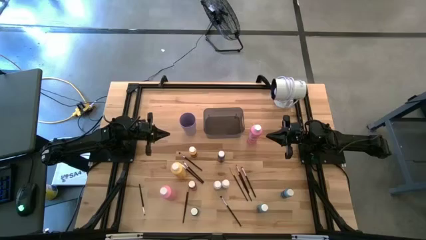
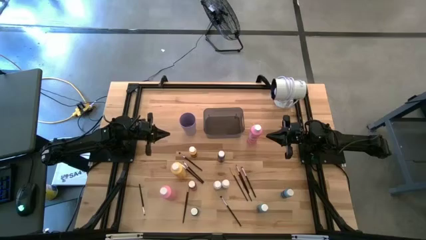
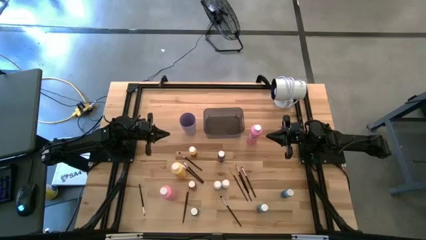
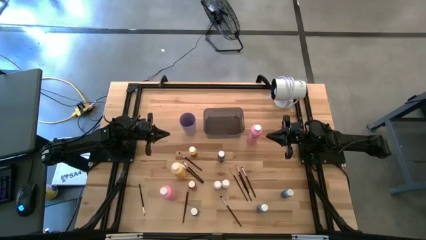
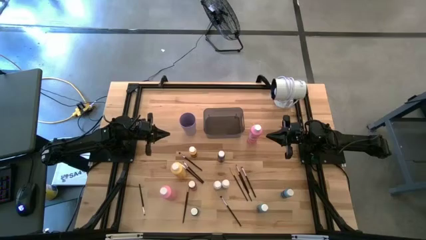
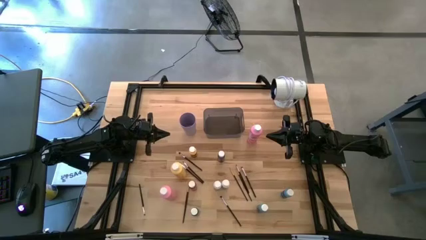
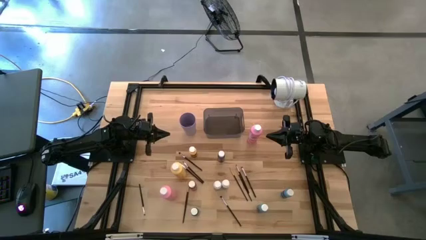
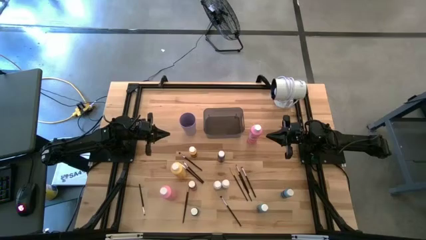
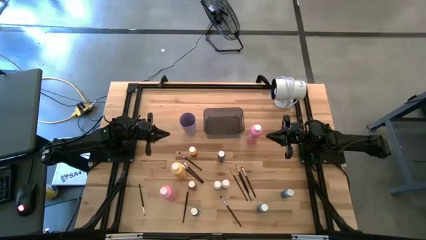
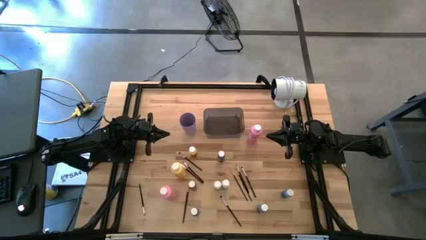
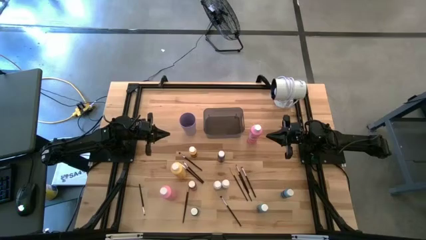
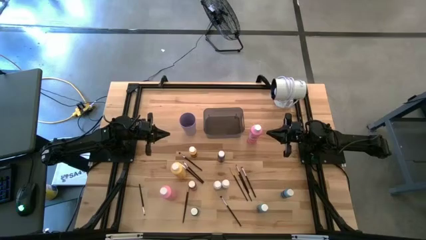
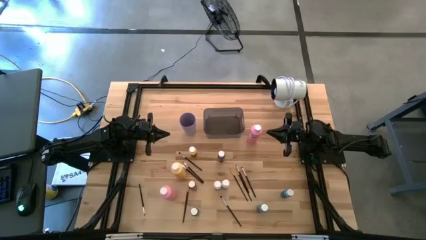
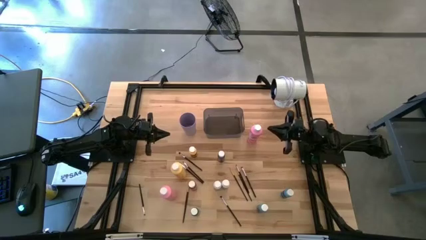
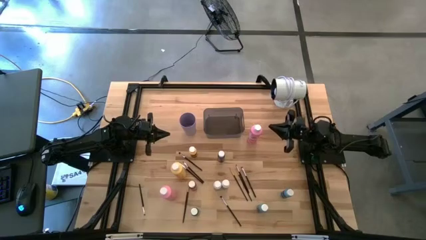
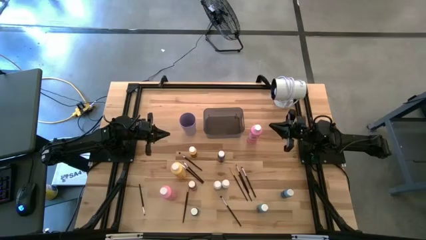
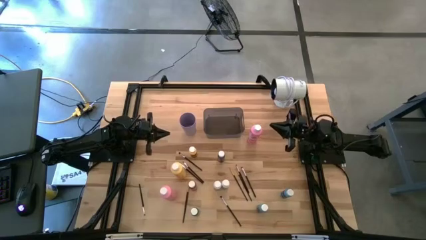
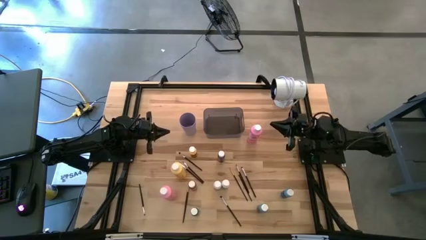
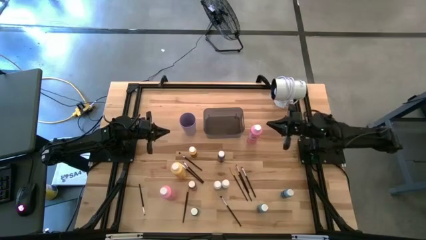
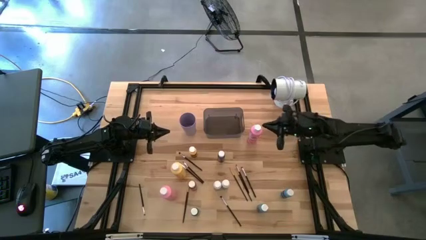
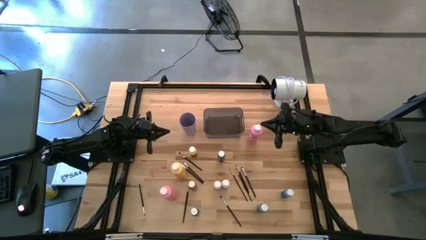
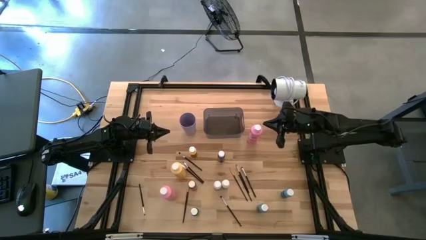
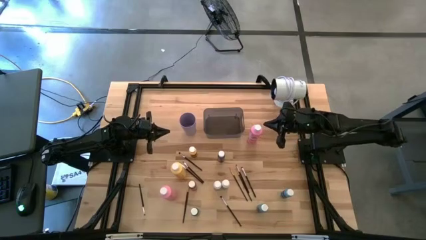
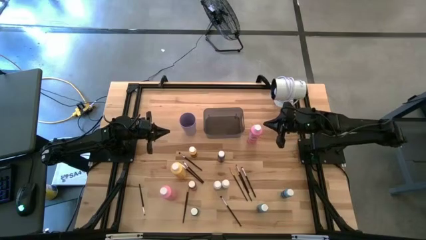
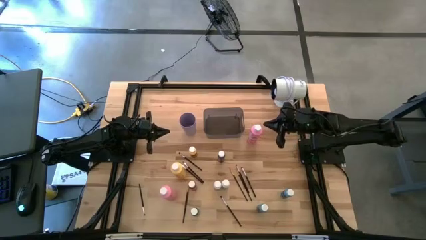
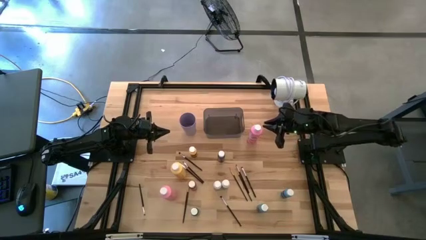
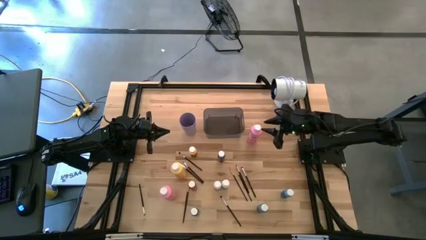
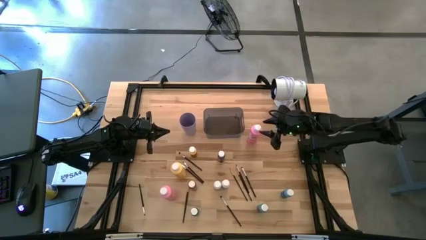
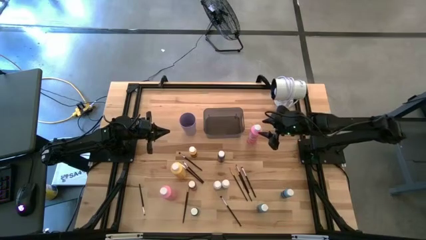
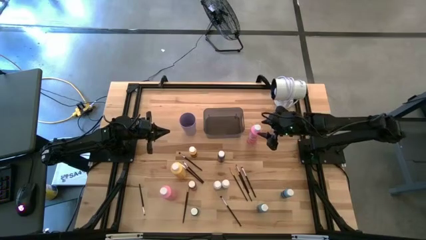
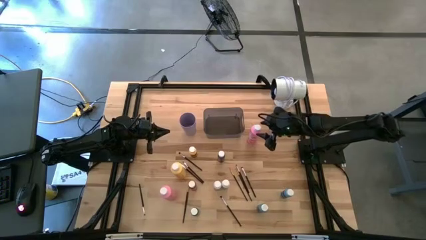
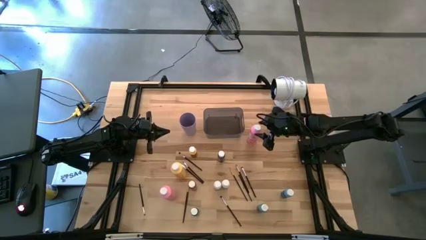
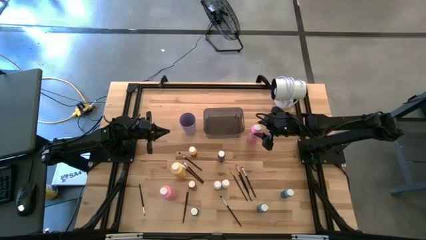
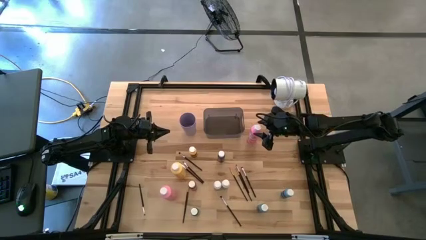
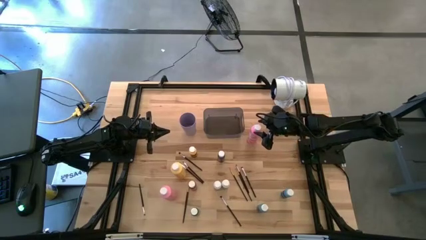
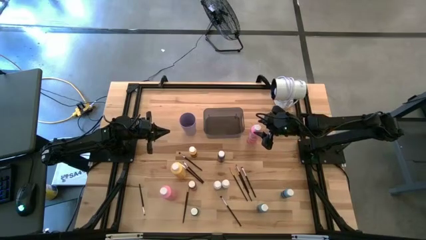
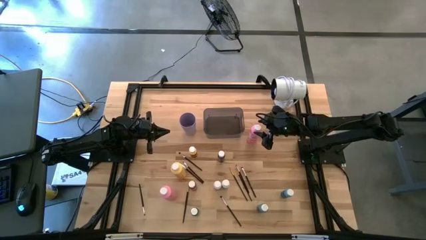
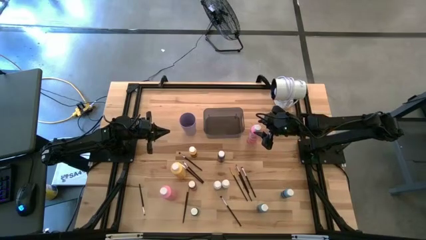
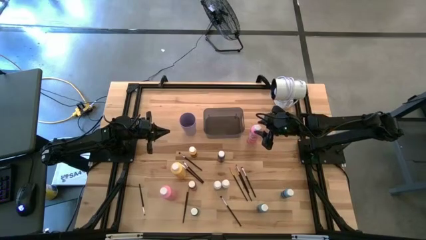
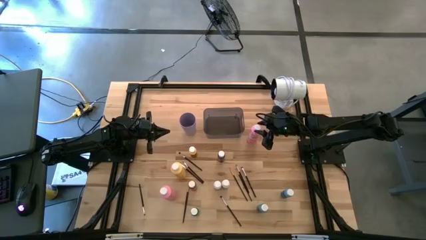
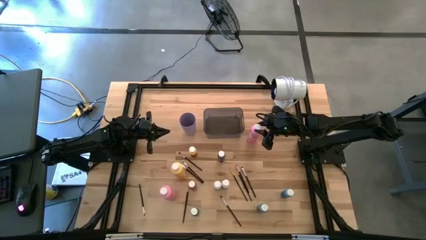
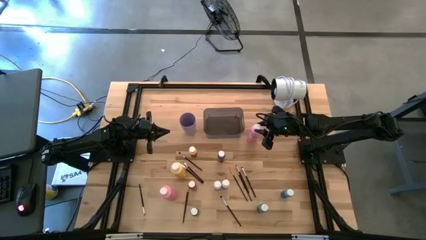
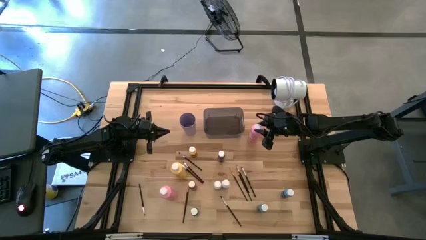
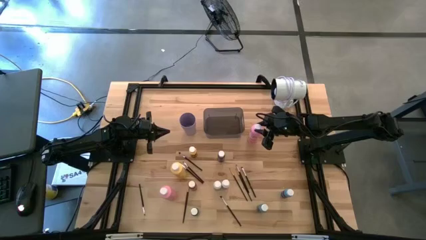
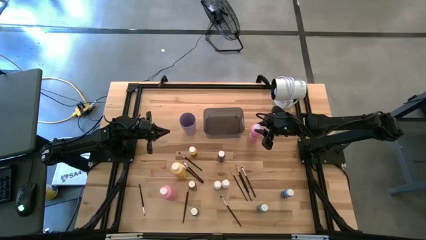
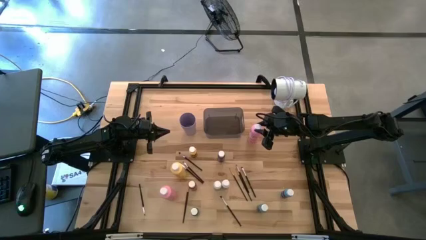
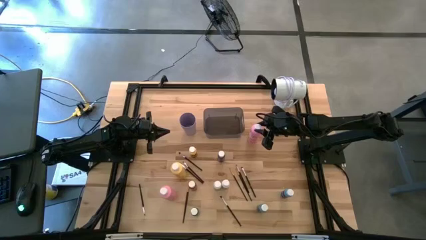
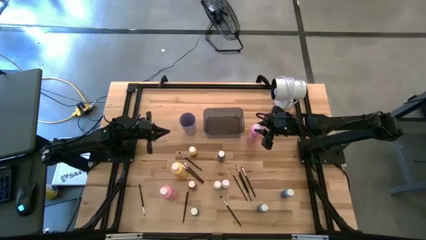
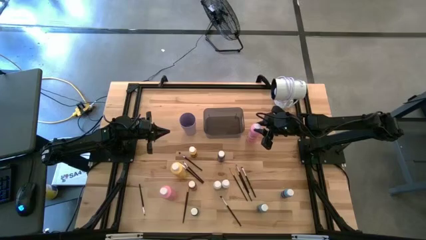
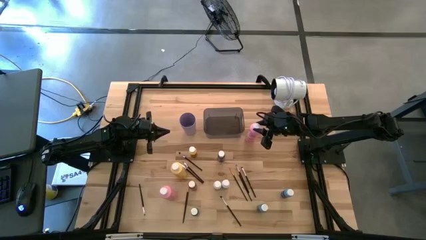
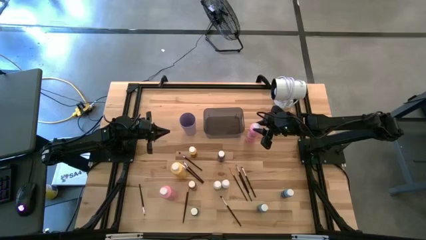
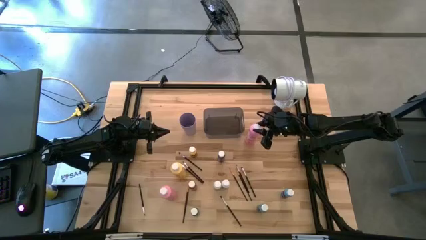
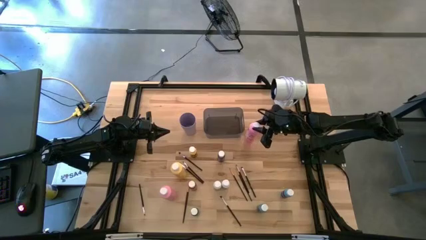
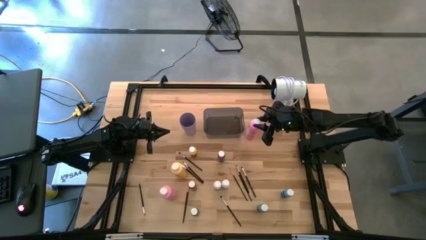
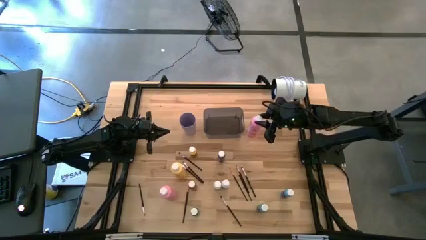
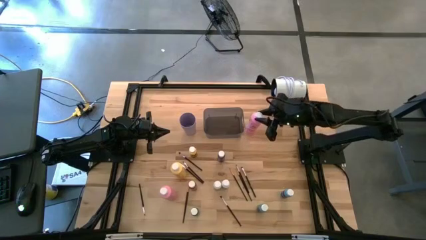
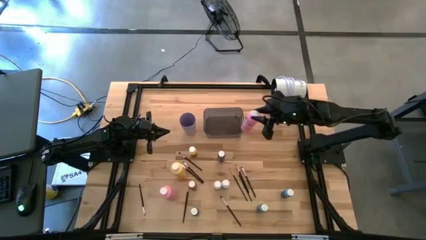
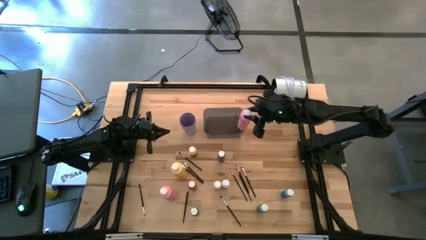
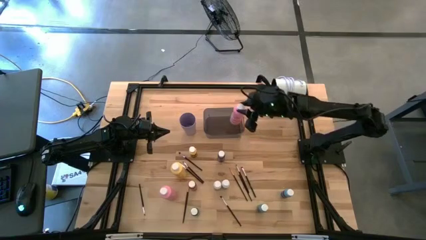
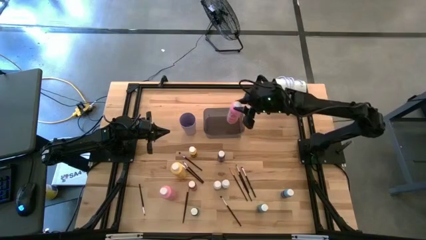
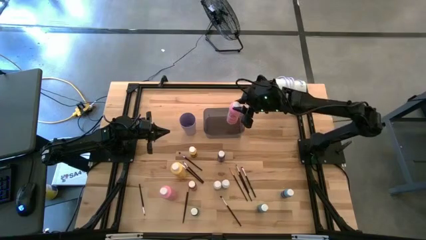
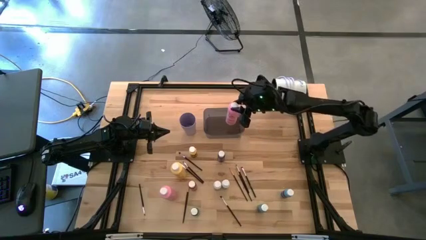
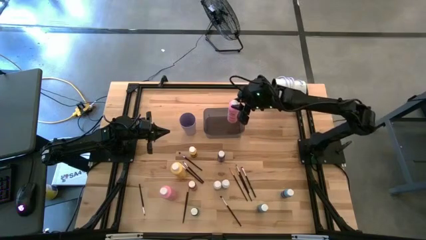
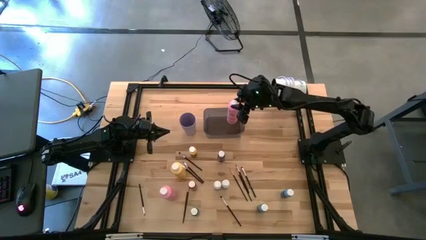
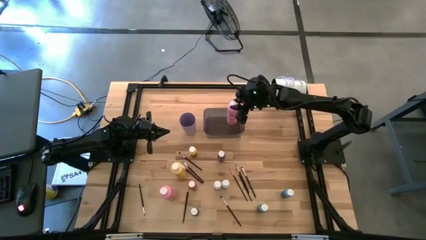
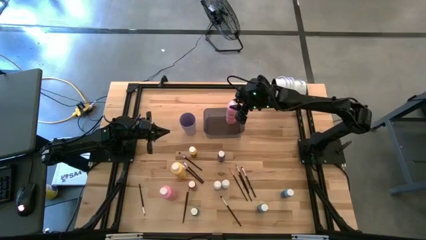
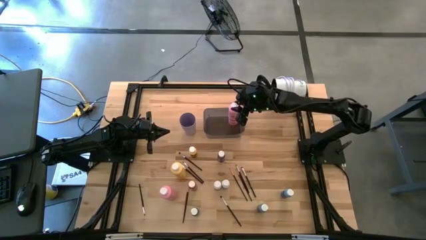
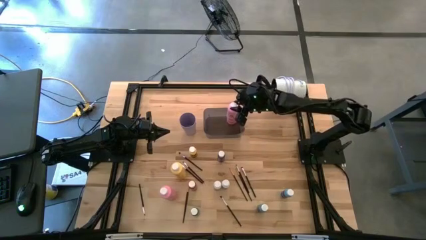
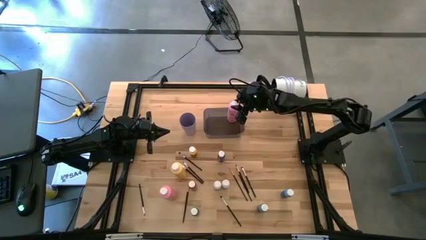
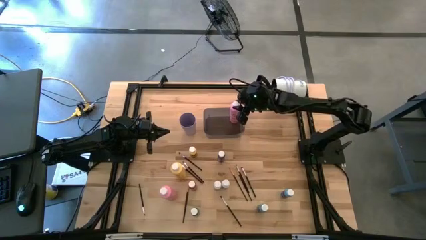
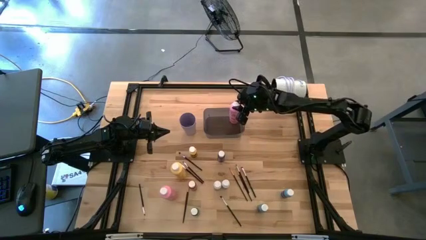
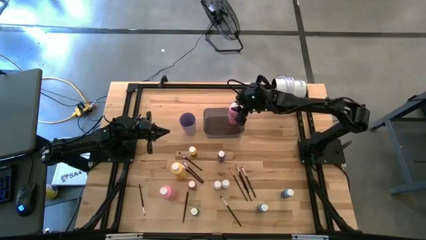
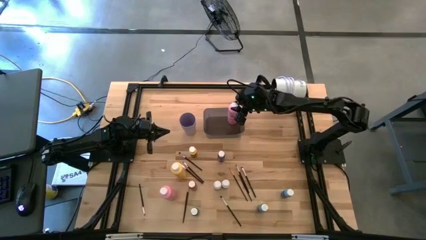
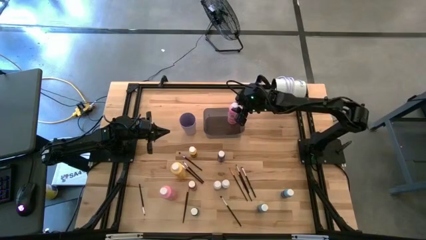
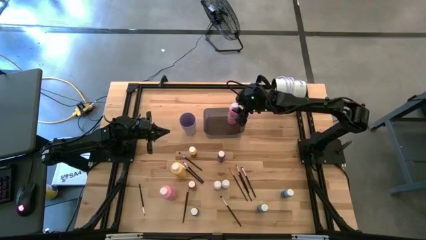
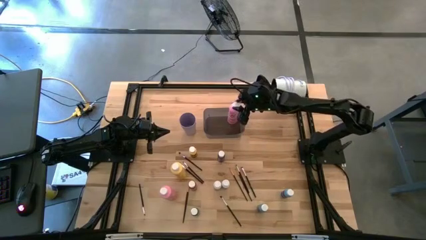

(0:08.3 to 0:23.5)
Task: Pick & Place Paint Supplies
Put the big pink paint bottle into the gray bin
